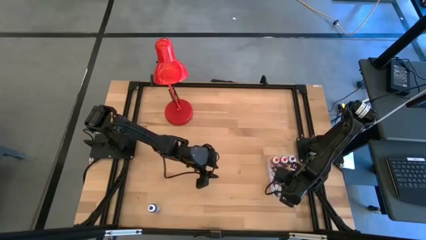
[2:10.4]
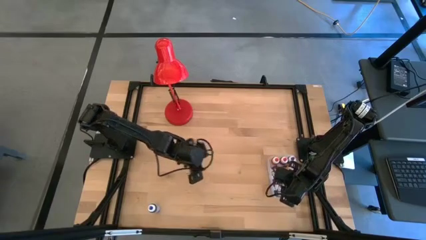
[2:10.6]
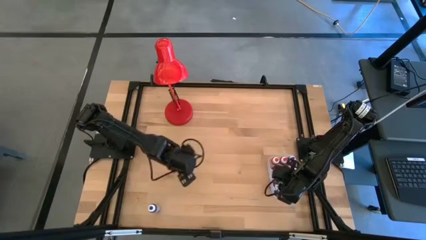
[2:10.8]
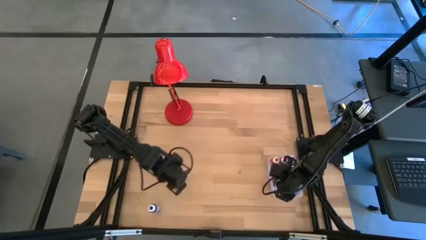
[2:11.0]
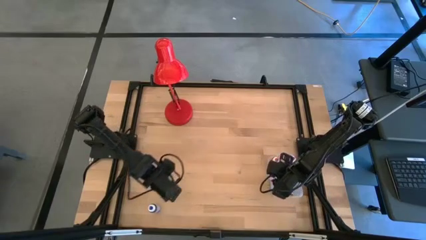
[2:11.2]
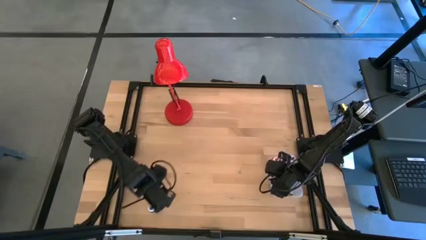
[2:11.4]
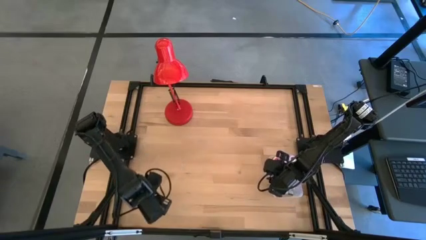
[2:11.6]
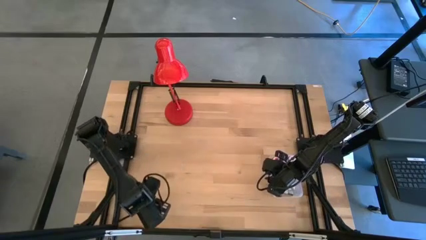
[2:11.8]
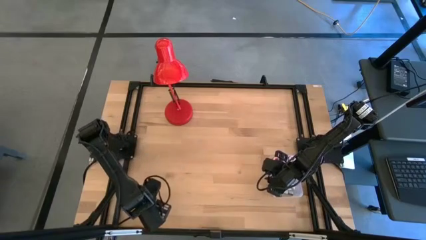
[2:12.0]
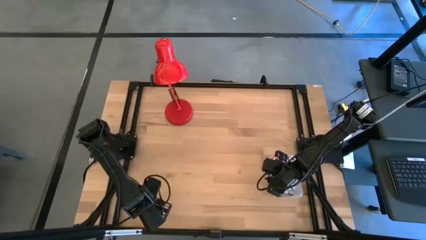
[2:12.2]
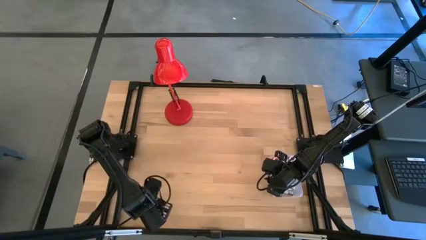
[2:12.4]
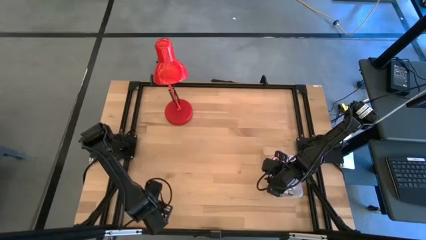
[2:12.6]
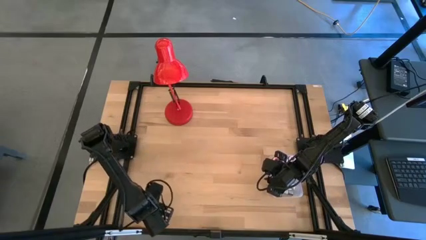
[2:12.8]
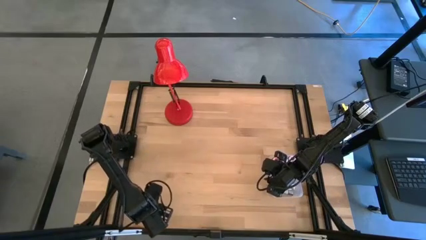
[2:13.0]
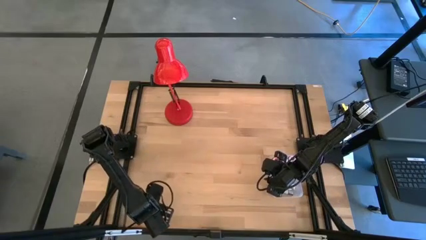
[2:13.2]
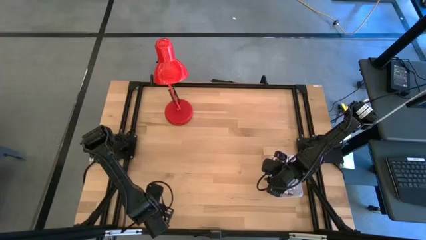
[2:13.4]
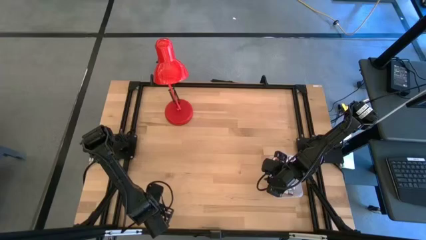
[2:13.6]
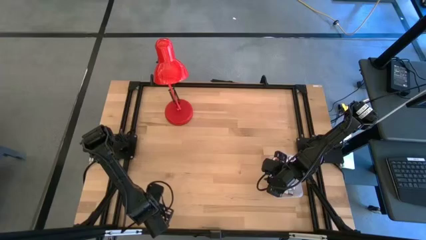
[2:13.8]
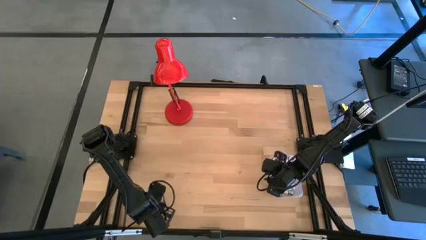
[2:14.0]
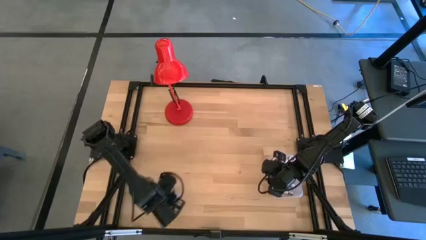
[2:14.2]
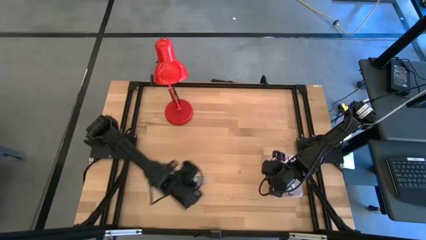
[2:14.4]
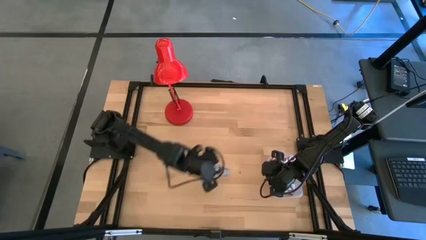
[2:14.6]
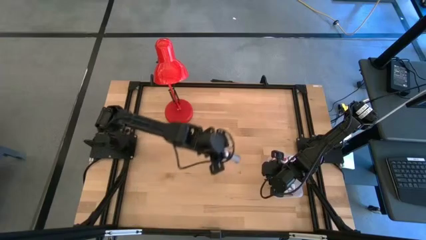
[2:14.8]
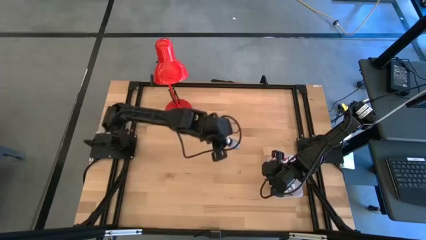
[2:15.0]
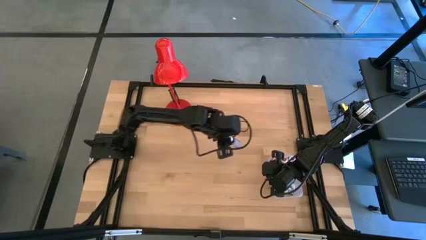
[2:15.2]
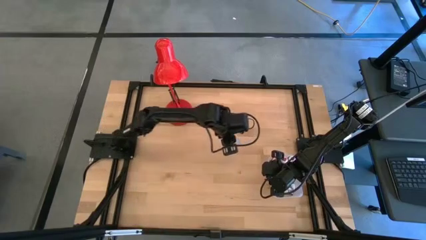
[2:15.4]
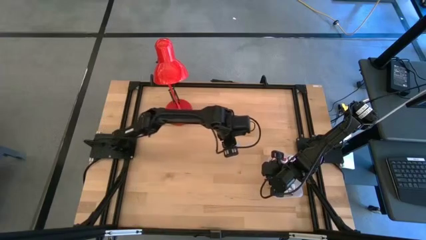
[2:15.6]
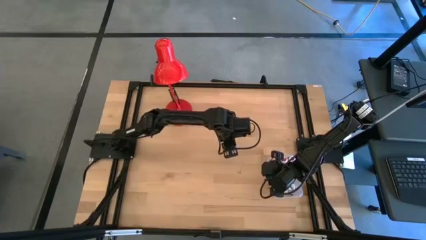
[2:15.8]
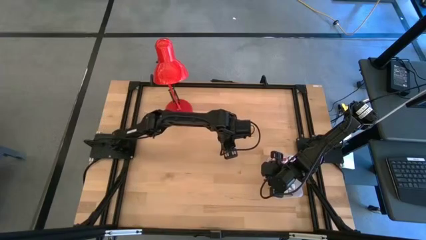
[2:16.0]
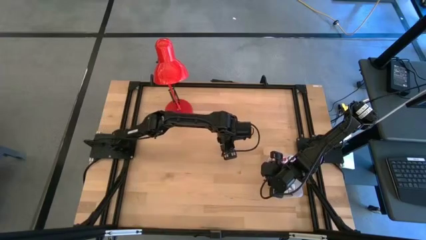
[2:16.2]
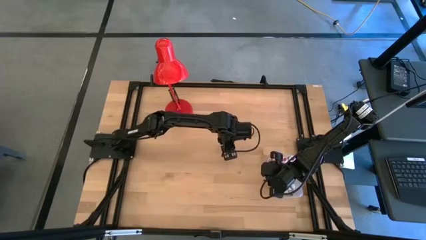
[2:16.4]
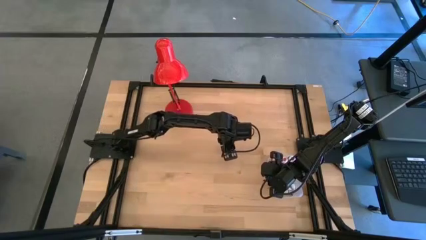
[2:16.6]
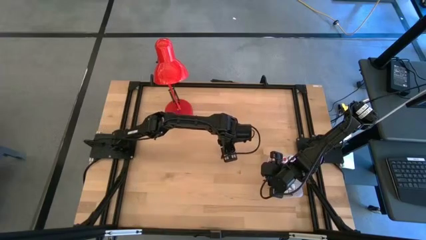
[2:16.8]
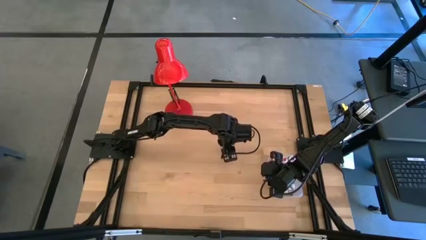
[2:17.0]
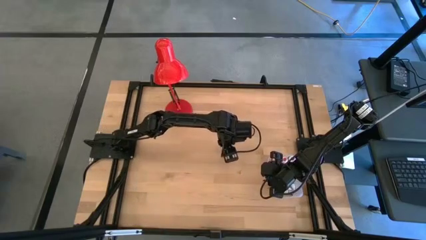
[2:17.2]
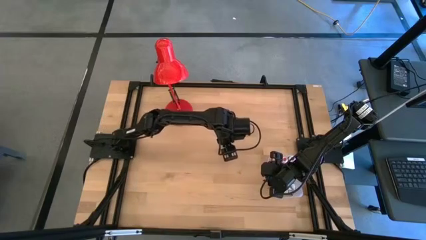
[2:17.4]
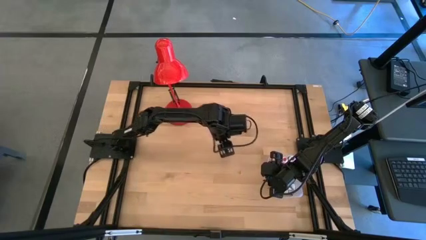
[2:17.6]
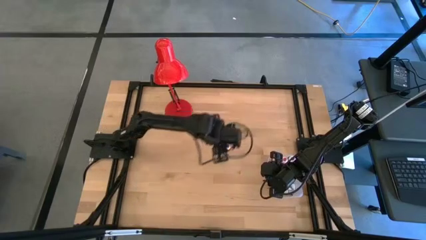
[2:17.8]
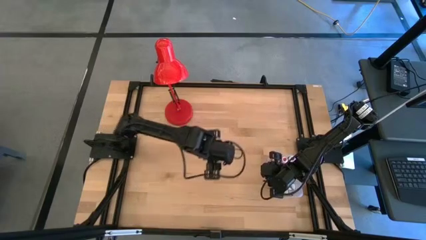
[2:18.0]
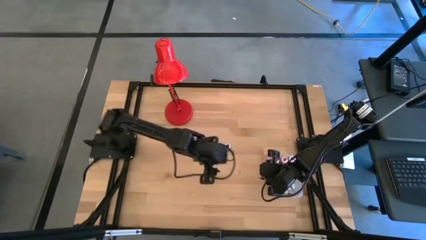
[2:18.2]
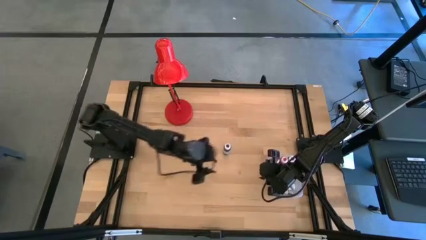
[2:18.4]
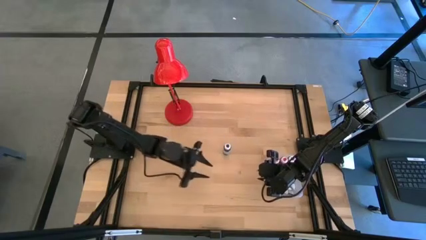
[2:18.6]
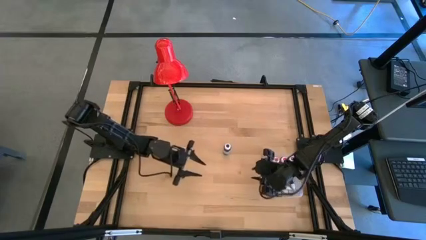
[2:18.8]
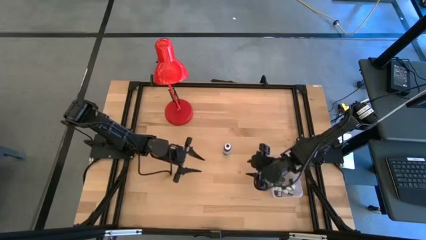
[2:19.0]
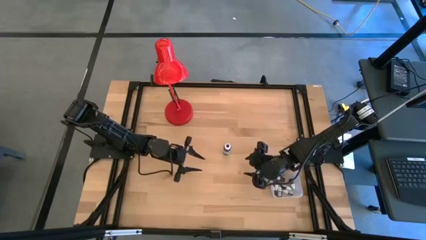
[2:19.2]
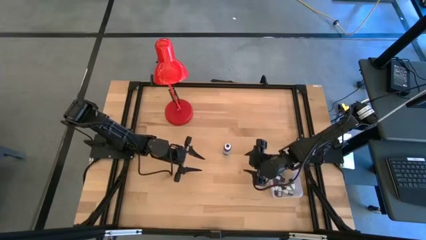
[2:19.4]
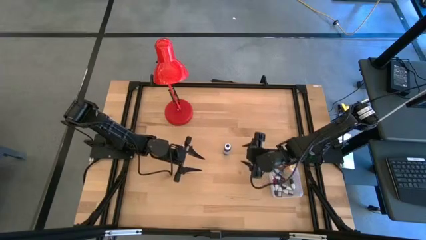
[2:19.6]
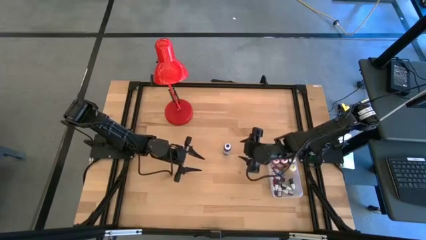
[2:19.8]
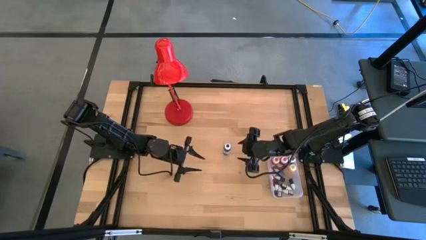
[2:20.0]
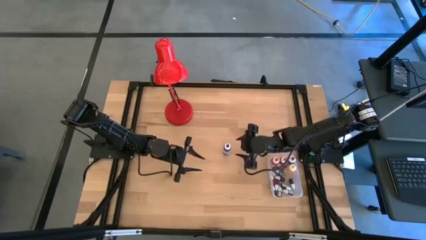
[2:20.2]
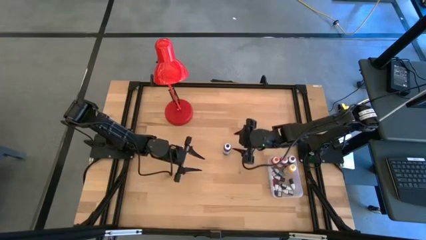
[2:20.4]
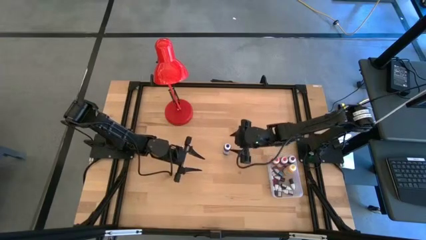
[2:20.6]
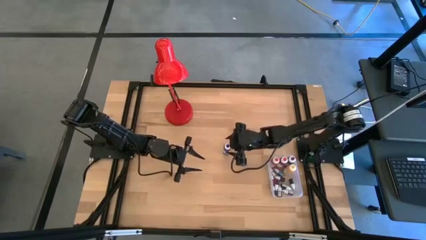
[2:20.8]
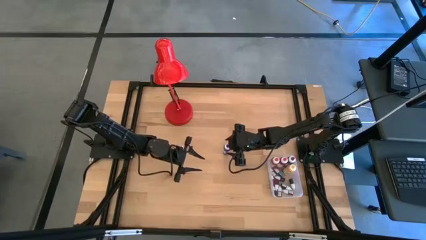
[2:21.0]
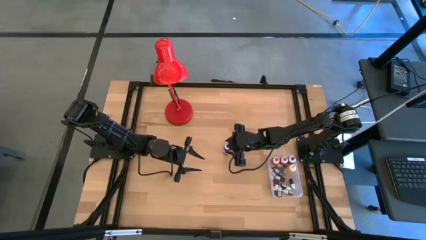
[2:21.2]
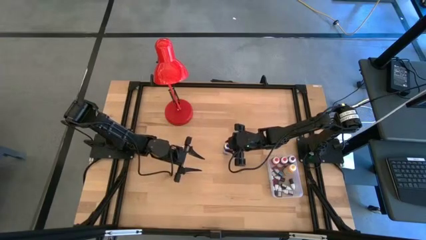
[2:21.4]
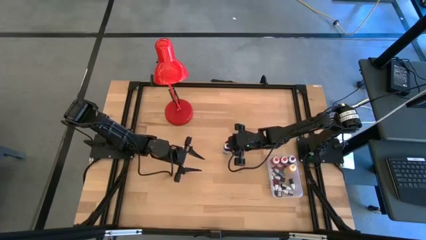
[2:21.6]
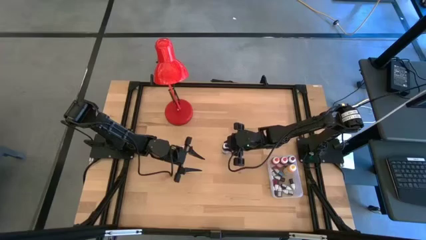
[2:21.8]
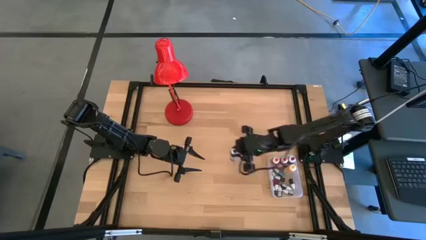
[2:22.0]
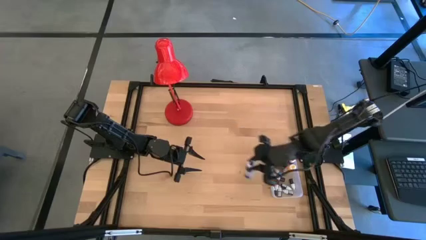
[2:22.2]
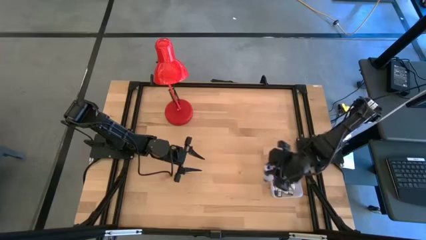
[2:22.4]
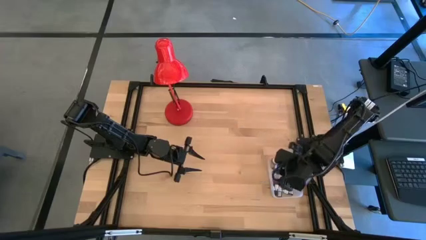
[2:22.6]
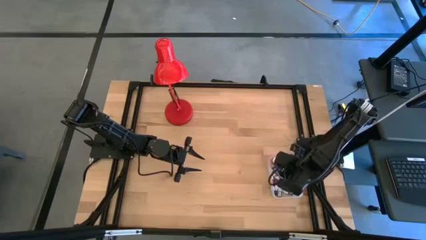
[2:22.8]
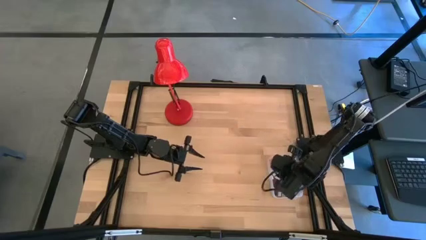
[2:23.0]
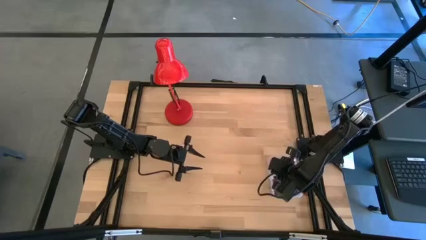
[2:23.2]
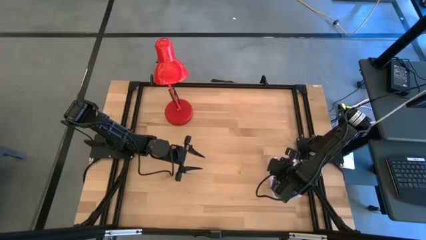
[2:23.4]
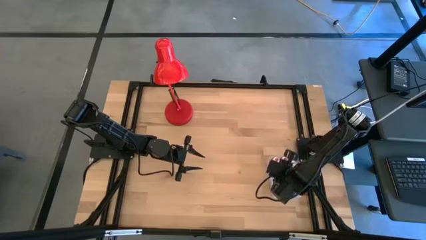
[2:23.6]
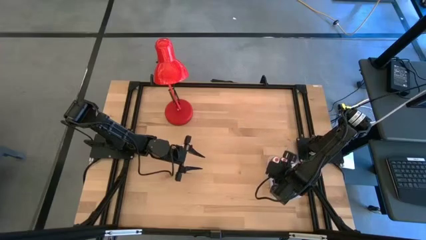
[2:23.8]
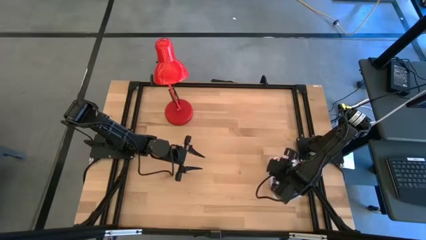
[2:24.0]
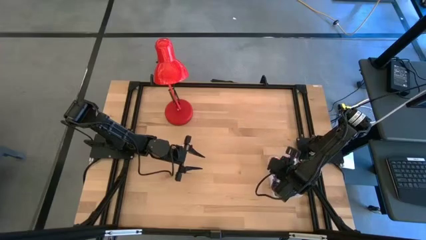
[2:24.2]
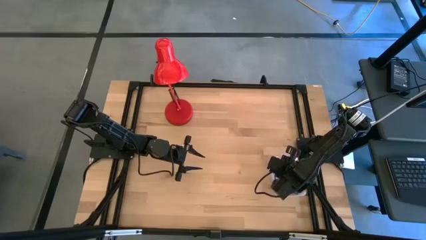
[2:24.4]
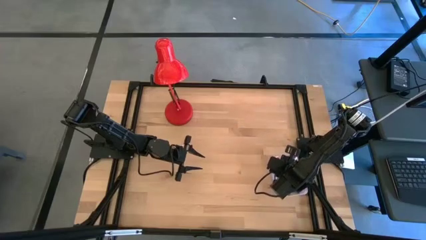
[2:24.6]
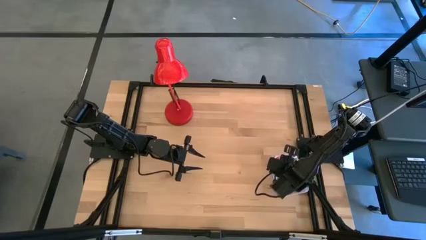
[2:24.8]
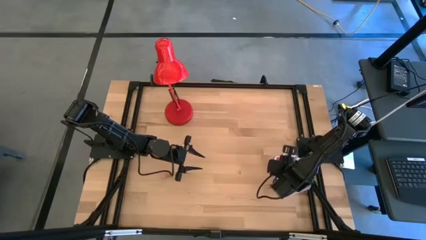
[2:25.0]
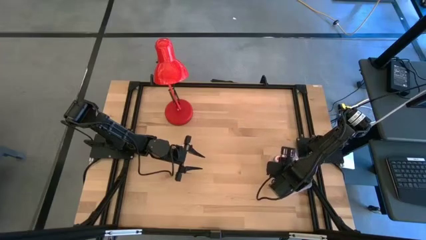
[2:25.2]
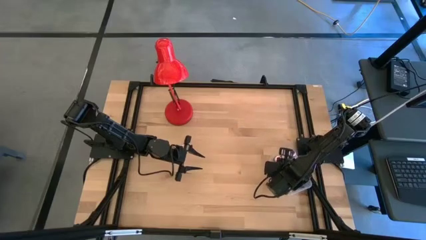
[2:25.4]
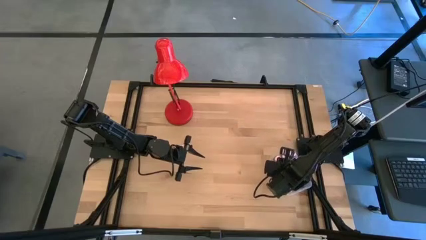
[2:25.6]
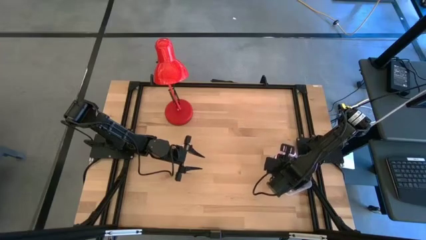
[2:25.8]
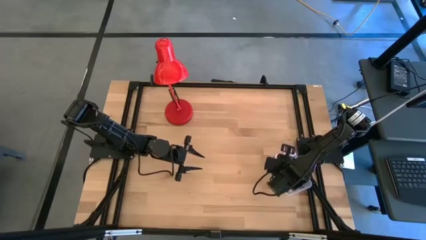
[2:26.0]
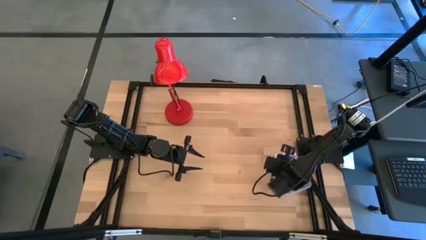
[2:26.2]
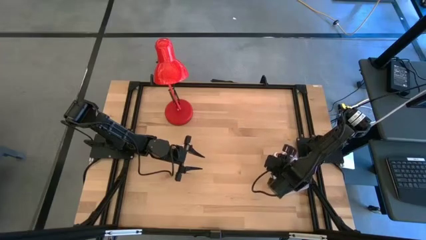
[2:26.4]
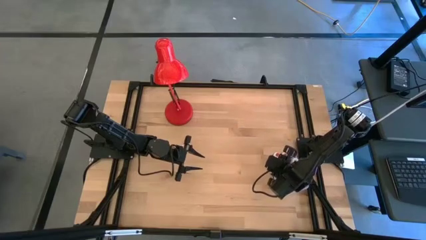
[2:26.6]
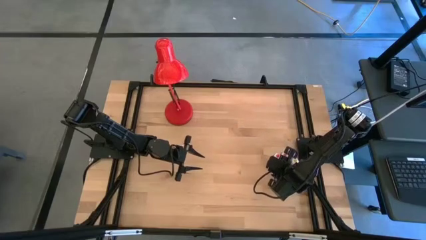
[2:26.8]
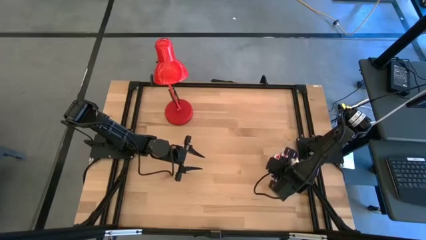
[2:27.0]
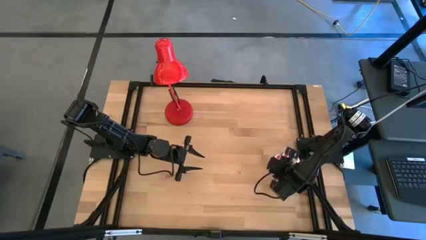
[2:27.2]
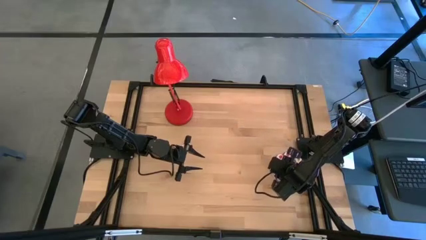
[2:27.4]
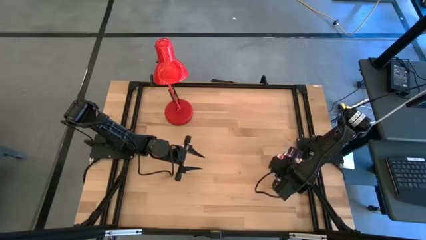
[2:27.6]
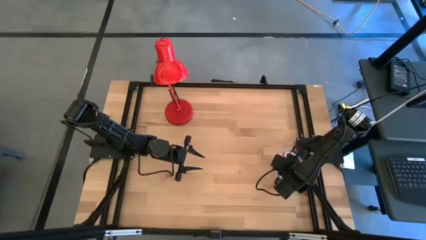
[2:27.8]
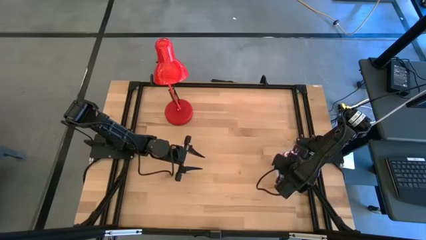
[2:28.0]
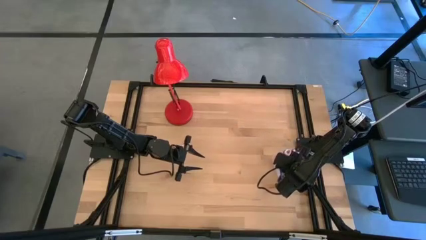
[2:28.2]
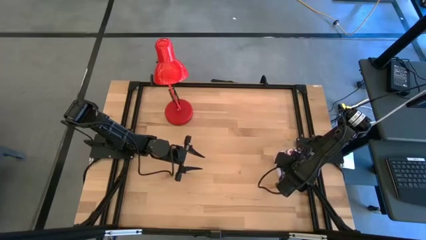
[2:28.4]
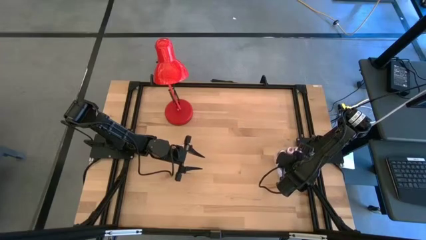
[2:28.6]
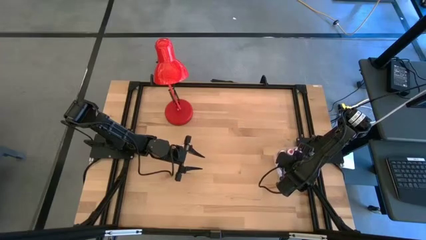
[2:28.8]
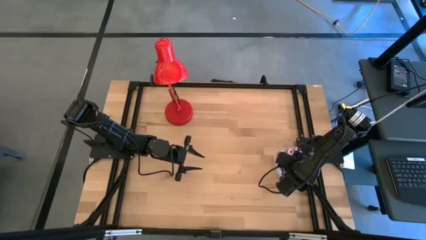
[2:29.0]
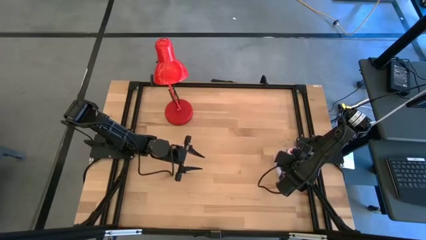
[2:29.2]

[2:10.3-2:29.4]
Task: Pick & Place food coloring
Put the big blue bottle into the transparent container
